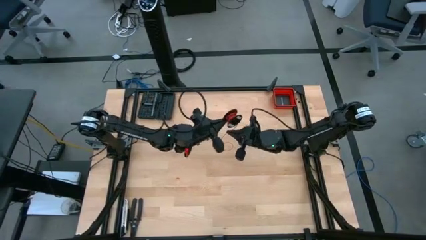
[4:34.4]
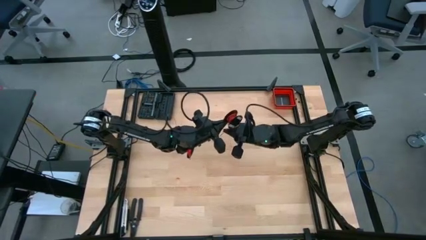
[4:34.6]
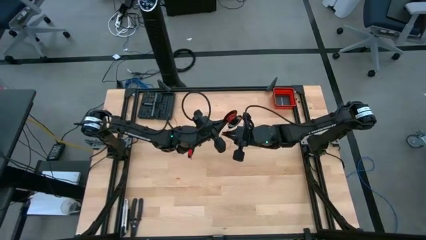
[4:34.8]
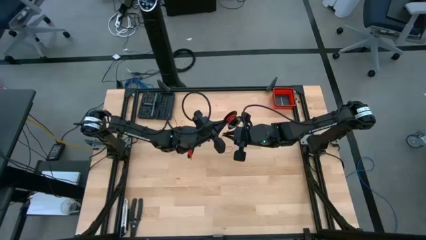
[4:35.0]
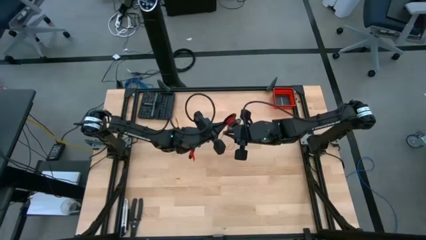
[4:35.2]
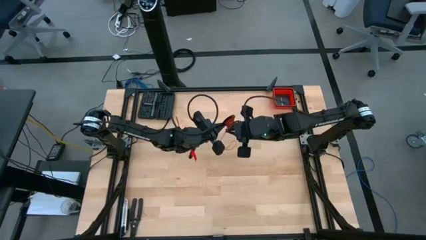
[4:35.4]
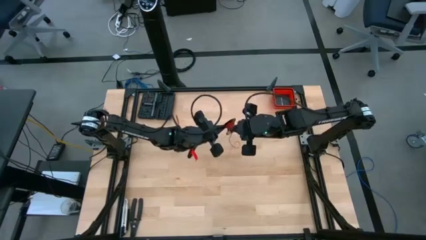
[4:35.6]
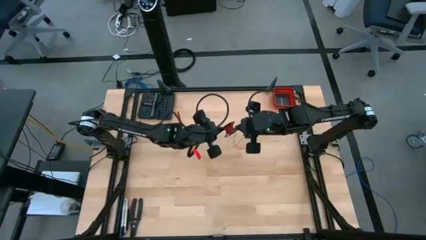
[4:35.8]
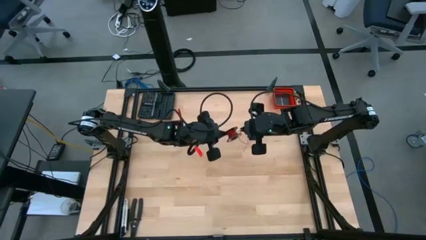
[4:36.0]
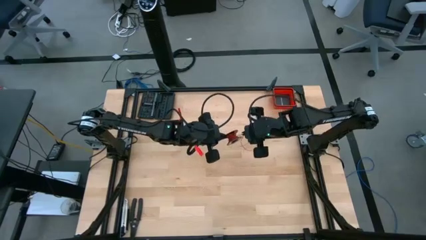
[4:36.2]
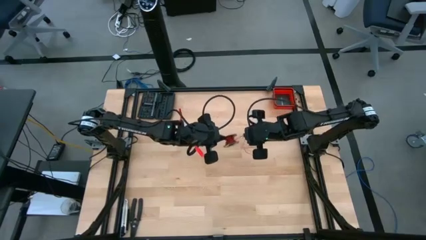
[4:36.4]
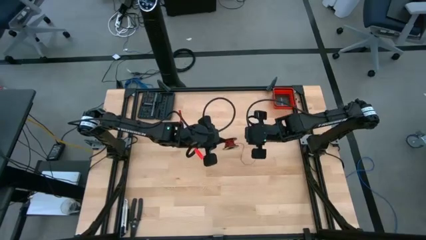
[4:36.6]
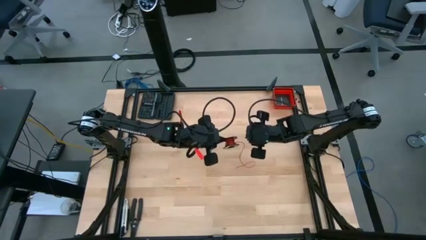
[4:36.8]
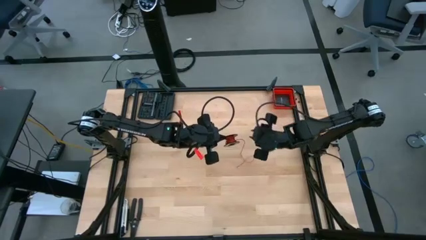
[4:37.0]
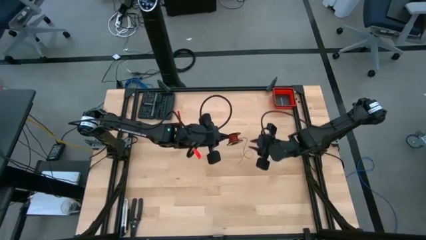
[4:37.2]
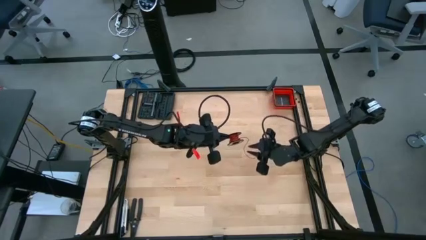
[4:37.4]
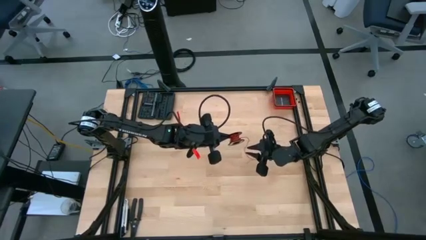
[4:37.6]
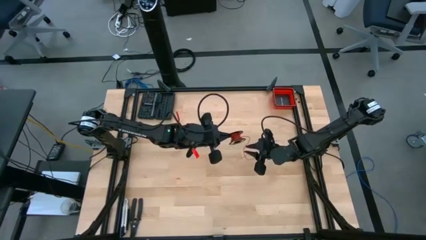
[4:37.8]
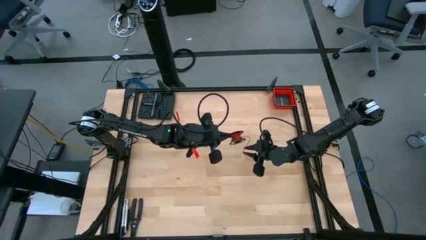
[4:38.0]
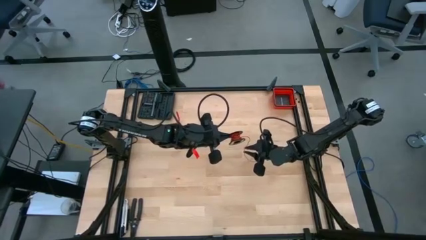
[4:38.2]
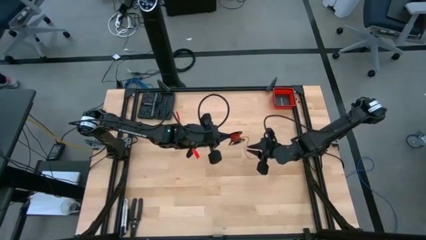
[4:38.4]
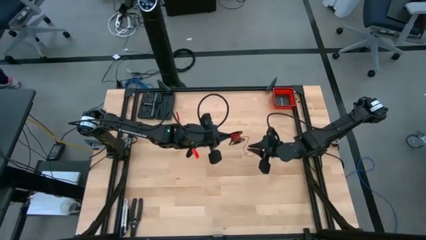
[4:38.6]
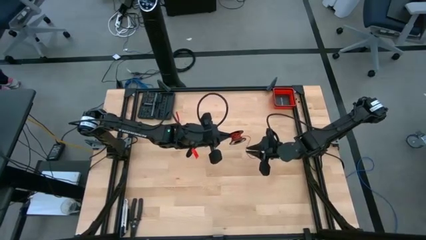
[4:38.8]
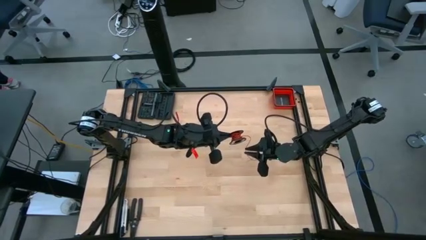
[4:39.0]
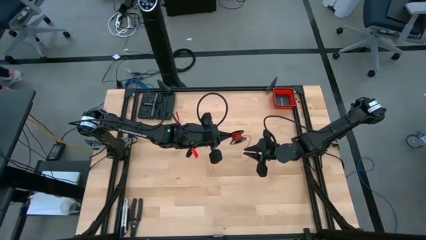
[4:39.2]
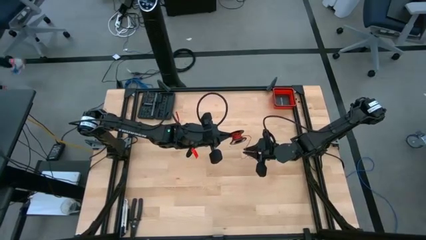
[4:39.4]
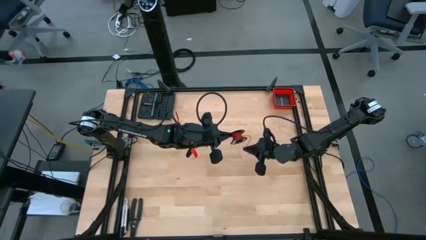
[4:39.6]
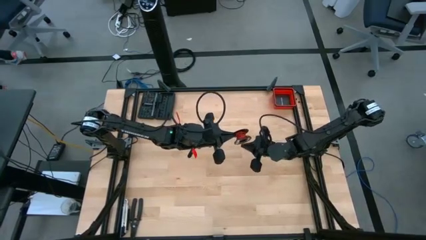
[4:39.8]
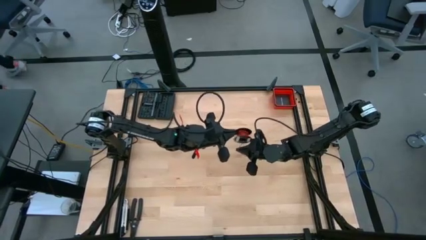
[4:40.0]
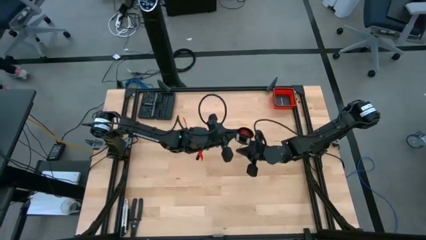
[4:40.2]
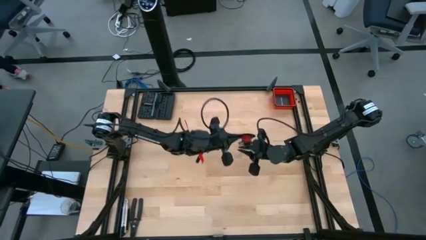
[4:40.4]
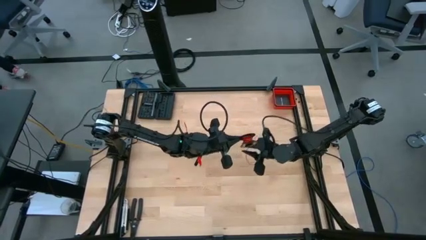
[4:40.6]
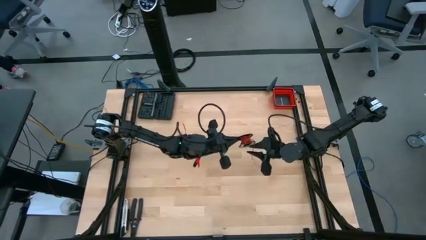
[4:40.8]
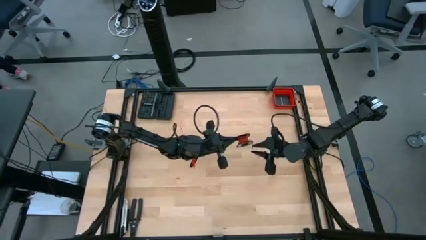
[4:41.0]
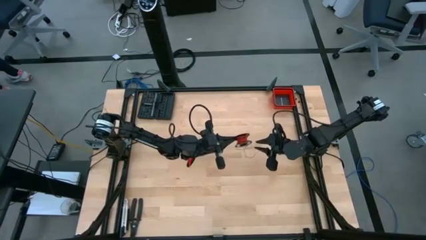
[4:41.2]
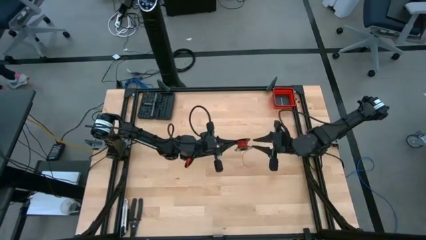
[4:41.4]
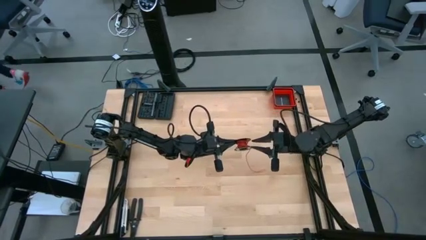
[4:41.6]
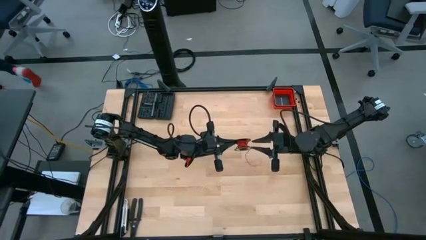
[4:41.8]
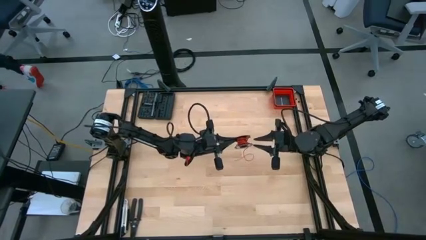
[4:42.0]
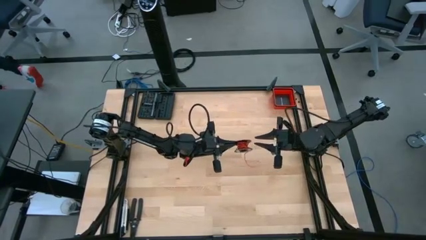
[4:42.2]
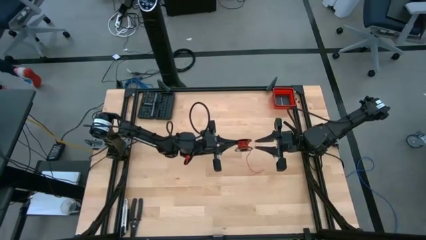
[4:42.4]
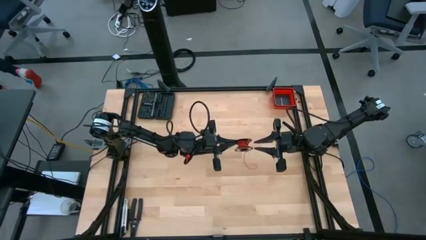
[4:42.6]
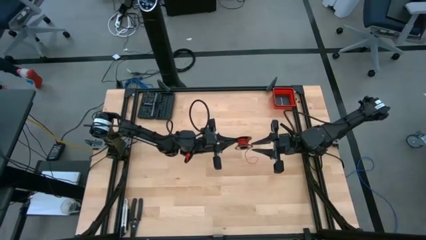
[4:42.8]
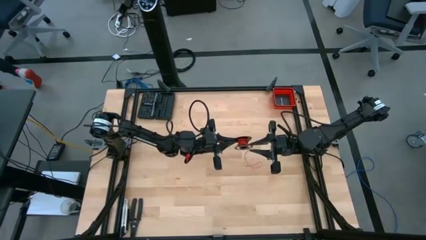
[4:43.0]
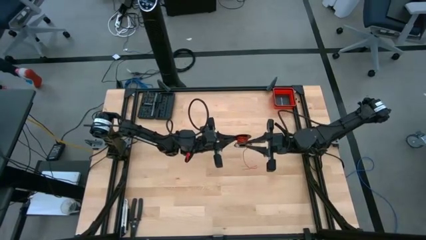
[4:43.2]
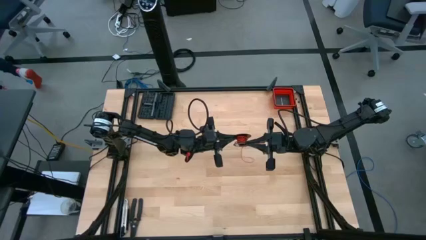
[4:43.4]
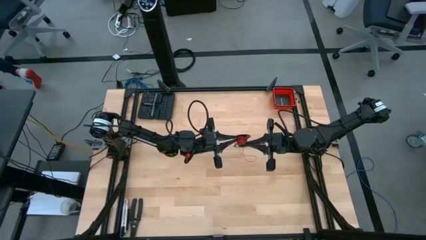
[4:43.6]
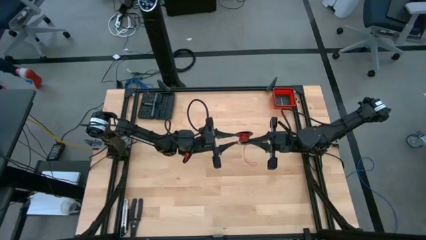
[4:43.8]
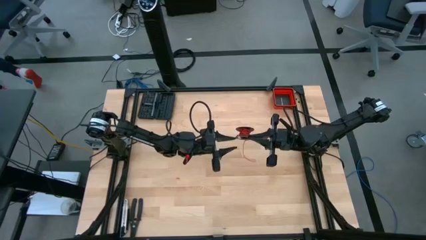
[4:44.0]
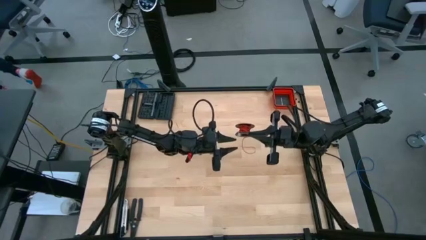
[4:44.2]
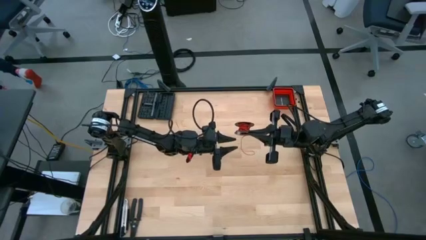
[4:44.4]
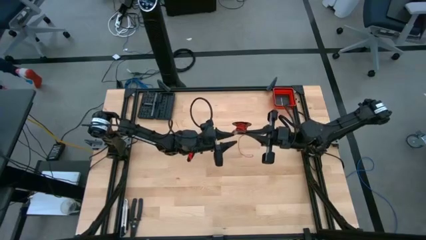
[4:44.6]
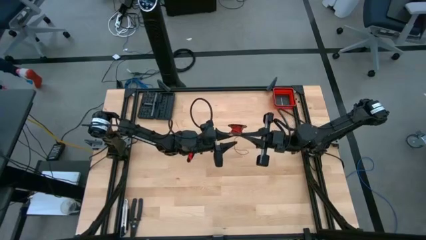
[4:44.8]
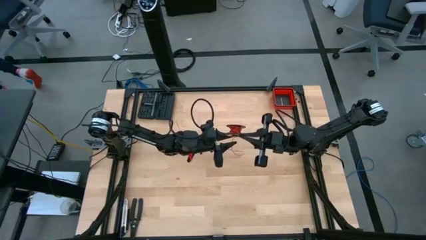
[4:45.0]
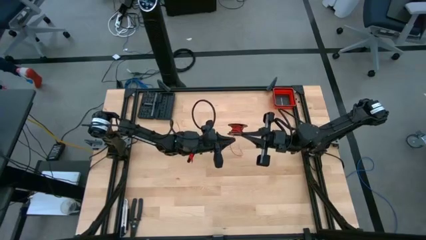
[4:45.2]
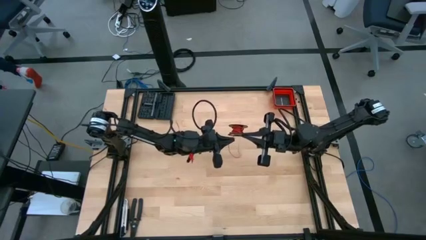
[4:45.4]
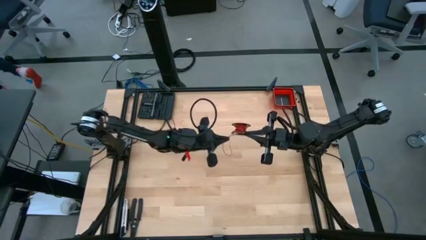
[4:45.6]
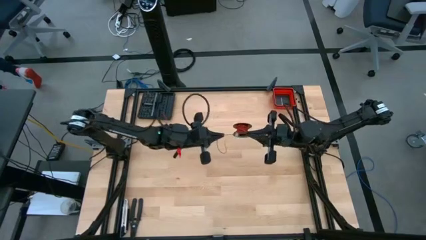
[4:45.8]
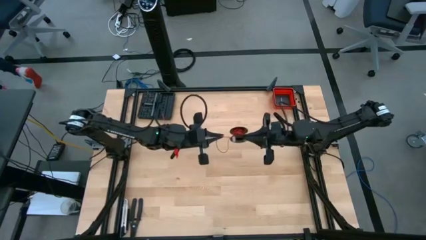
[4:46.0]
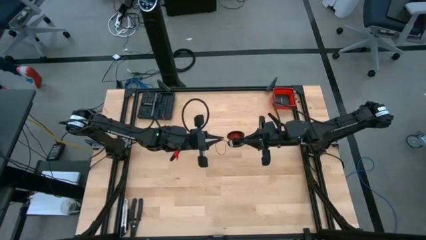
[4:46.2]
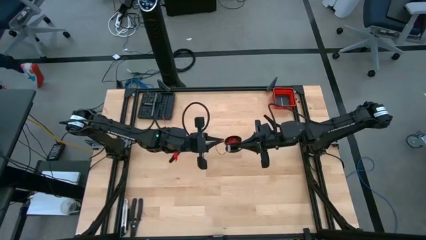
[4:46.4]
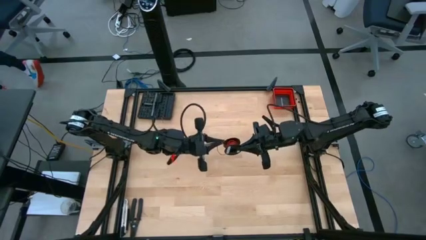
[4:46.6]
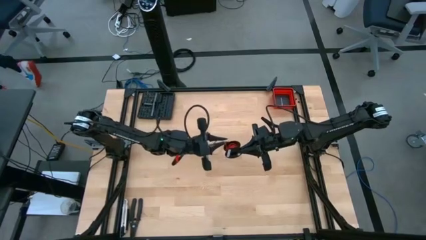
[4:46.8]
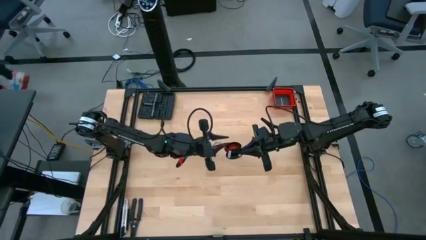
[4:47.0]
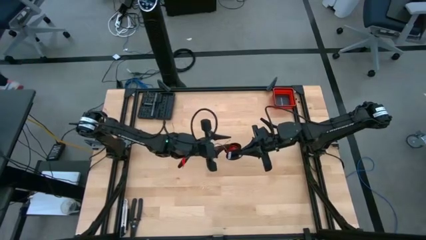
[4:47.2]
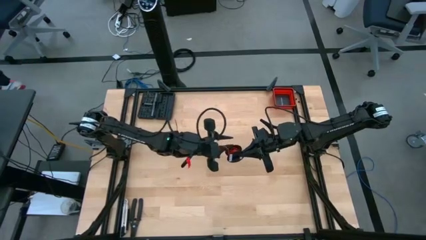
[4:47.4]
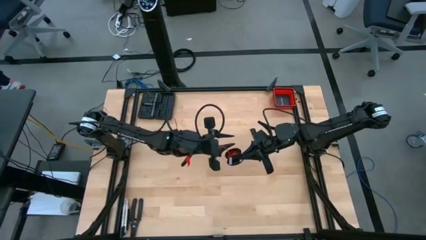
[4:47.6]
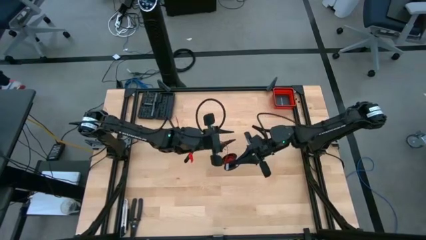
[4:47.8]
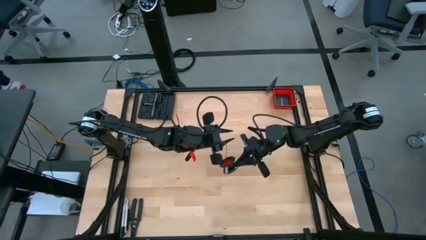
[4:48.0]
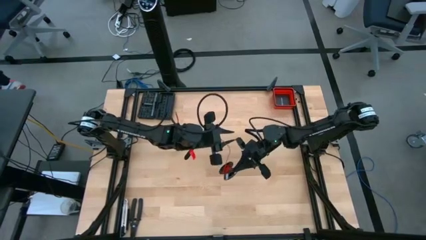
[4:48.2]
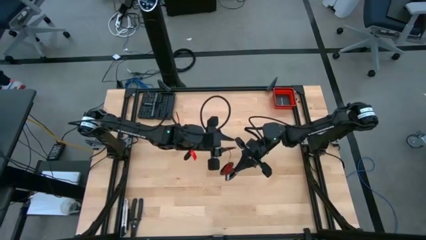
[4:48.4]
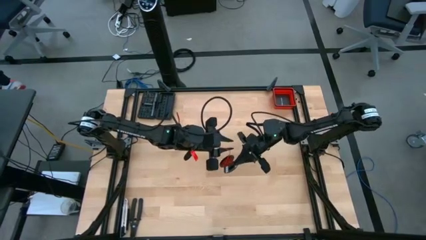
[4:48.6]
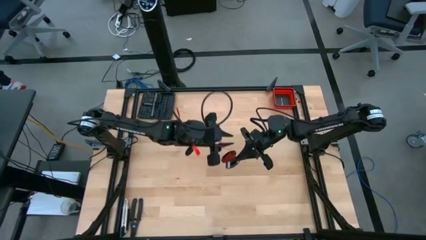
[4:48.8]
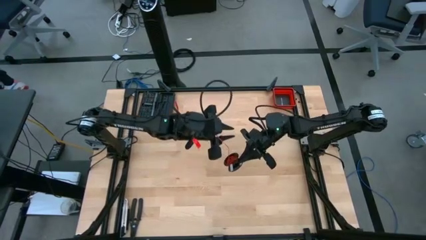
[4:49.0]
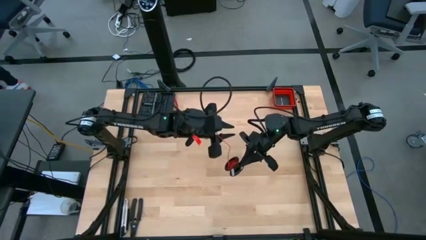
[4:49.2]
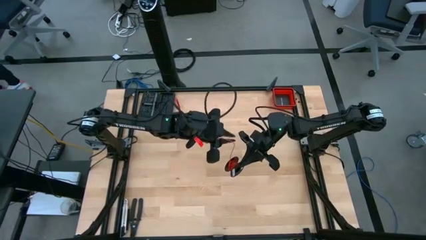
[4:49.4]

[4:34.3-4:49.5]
Task: Coil cords
Coil the red wire on the black spool

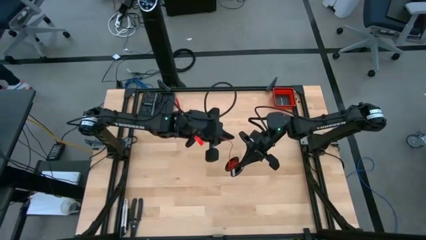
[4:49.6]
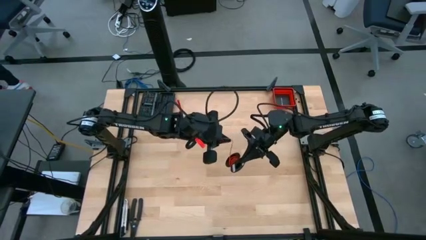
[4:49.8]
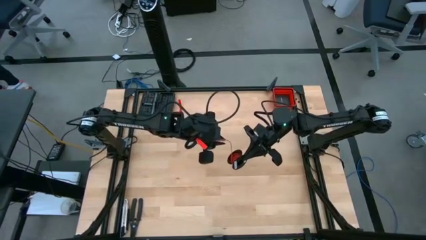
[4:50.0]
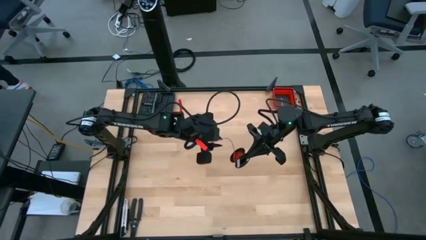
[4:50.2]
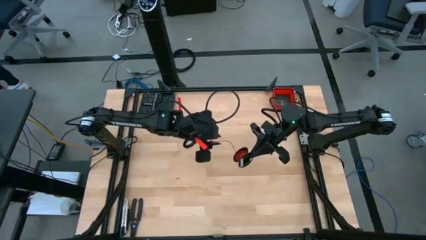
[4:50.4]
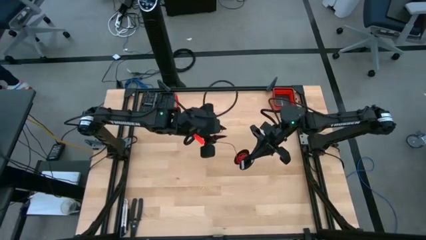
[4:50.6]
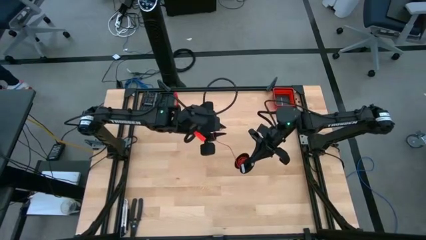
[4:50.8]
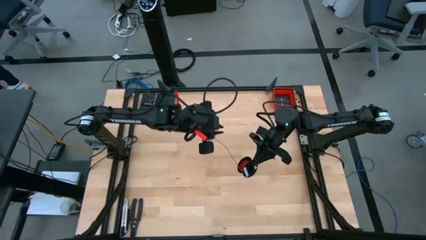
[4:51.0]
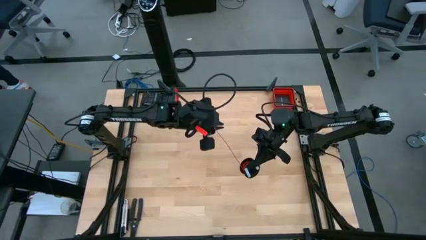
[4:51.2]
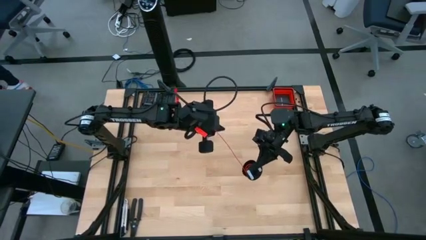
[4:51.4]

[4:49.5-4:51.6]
Coil the red wire on the black spool
